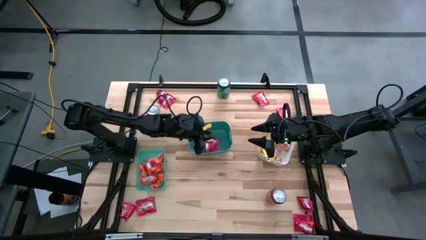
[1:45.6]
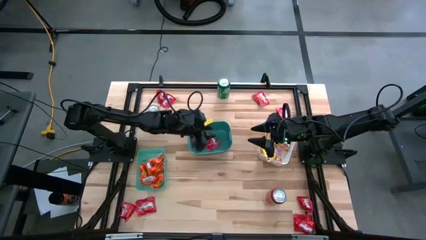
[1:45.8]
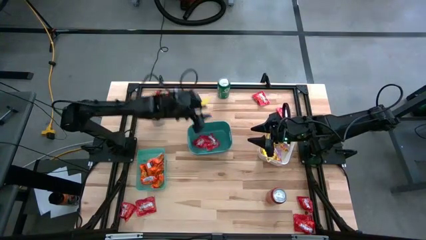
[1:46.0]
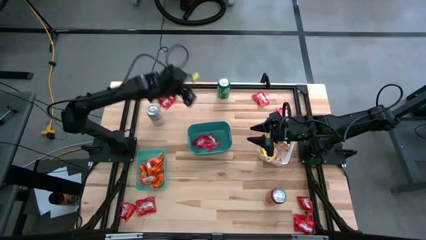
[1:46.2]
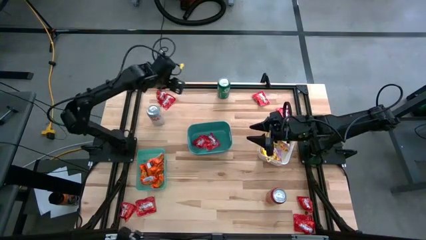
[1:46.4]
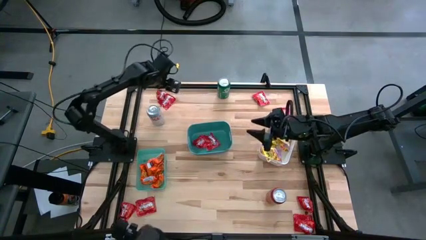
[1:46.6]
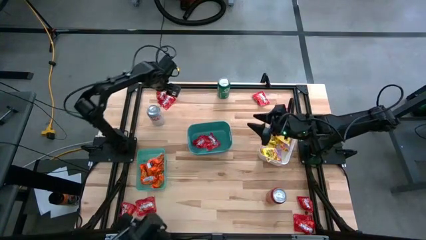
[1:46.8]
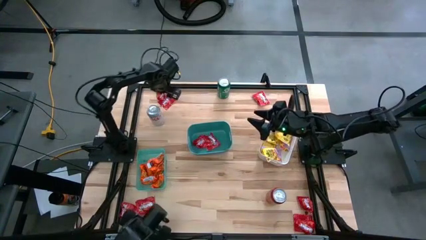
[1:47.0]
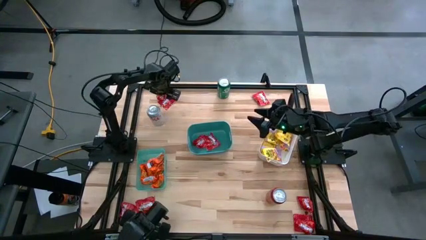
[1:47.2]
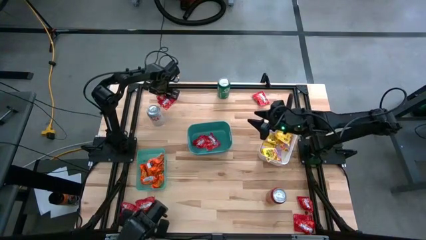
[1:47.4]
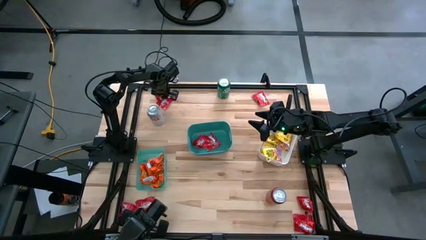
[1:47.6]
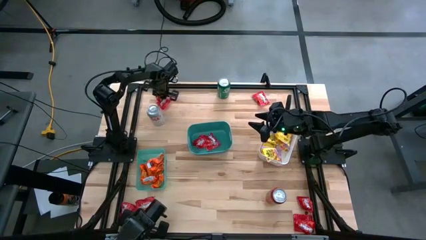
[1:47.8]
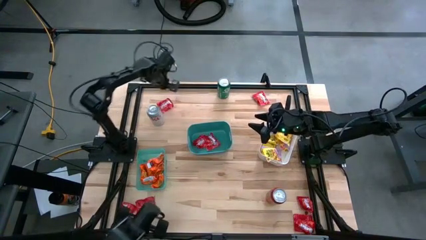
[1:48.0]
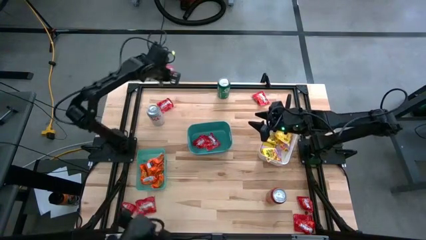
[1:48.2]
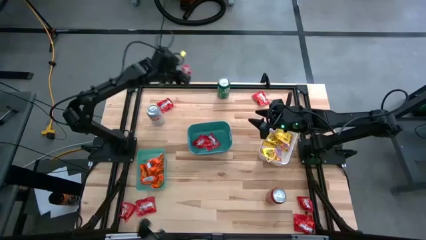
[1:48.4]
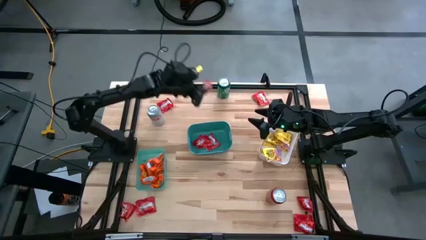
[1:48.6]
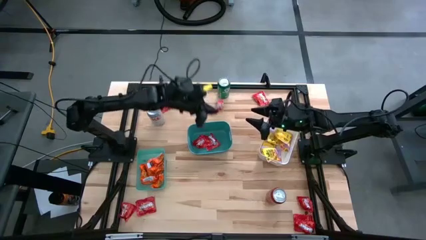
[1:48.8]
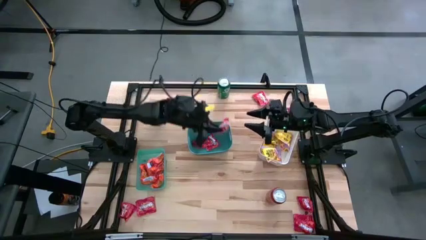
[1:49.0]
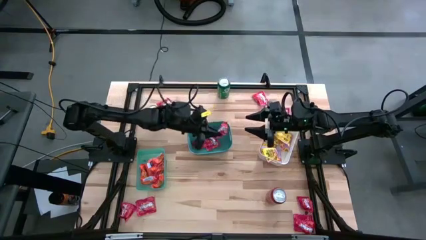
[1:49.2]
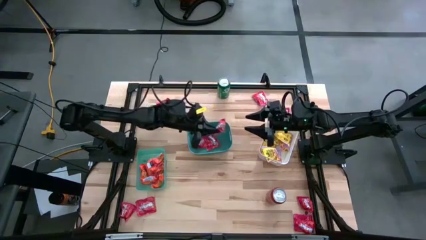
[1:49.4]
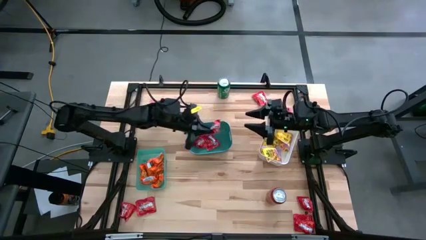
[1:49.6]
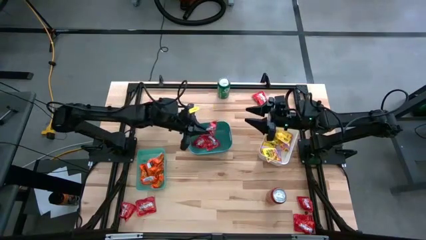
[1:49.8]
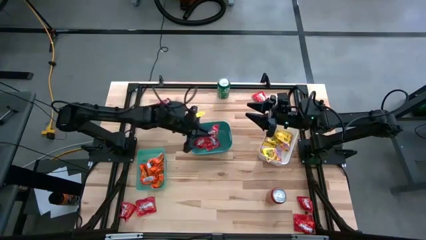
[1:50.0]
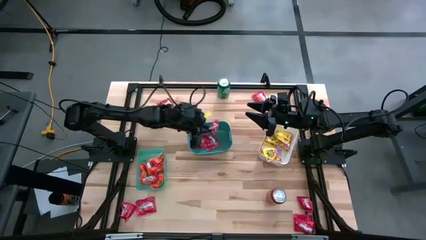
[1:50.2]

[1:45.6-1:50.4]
Task: Sort candy
Put the red candy into the green bin

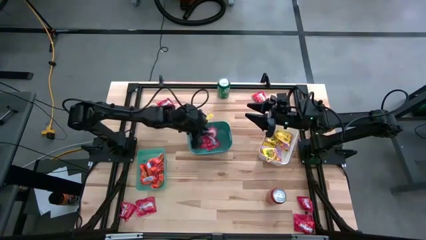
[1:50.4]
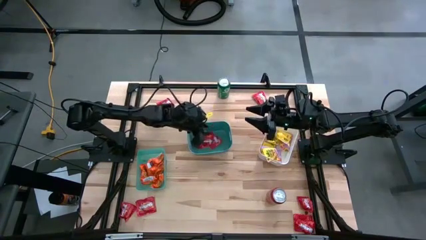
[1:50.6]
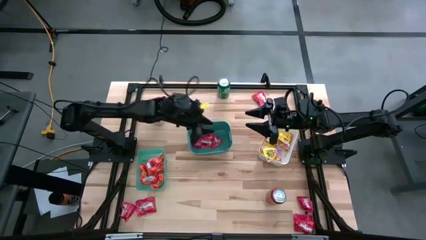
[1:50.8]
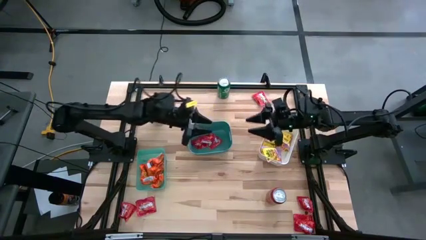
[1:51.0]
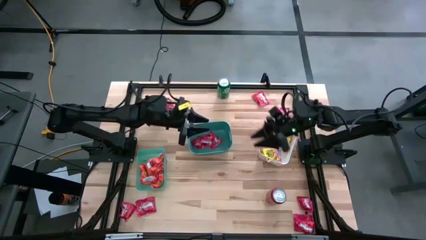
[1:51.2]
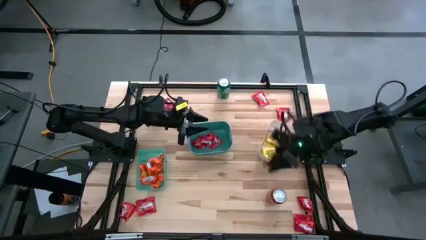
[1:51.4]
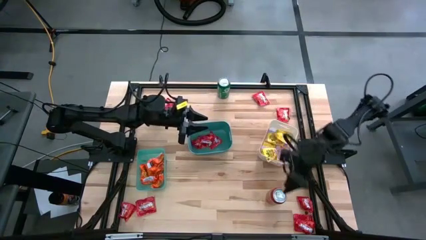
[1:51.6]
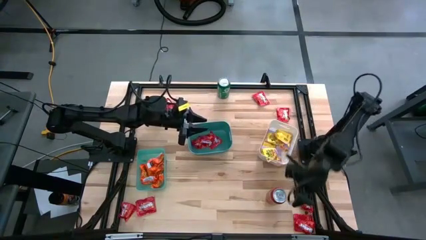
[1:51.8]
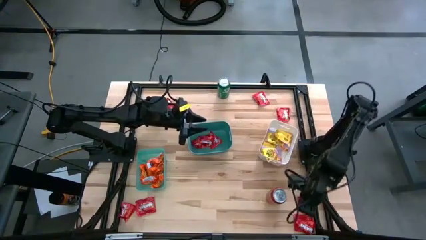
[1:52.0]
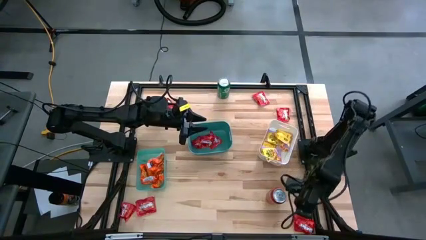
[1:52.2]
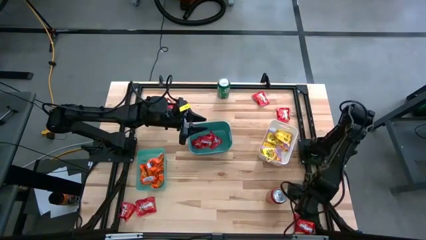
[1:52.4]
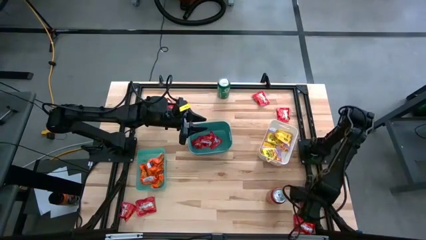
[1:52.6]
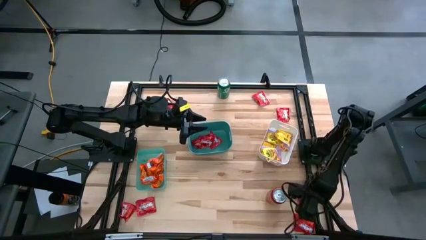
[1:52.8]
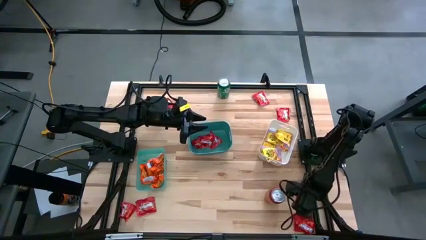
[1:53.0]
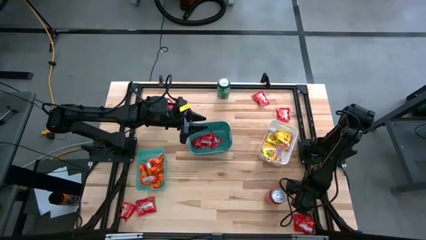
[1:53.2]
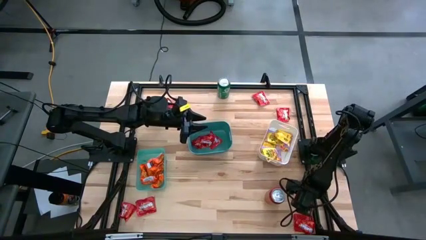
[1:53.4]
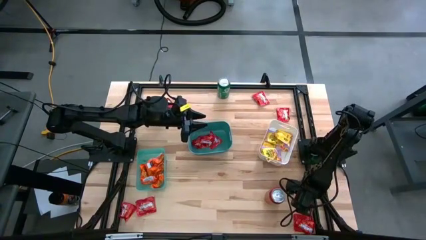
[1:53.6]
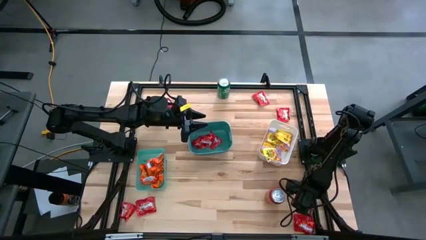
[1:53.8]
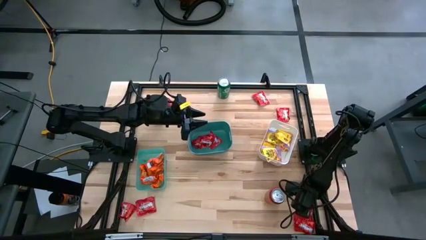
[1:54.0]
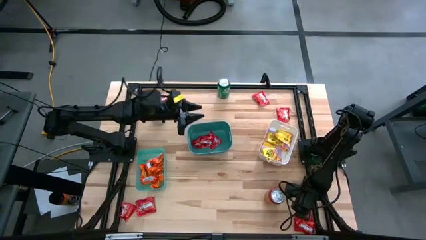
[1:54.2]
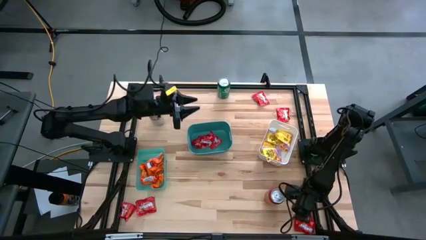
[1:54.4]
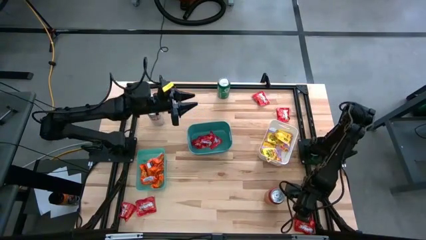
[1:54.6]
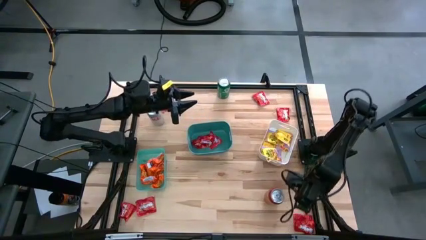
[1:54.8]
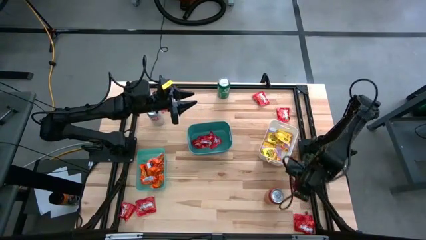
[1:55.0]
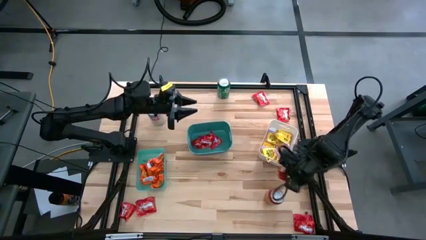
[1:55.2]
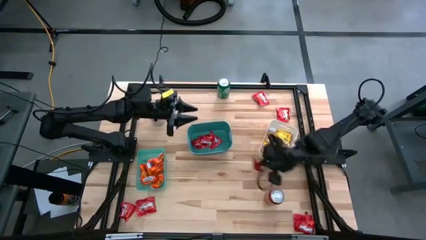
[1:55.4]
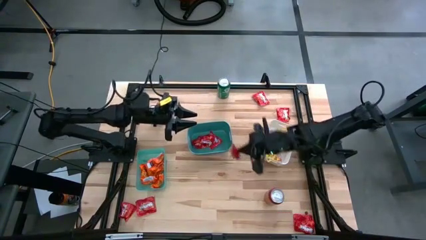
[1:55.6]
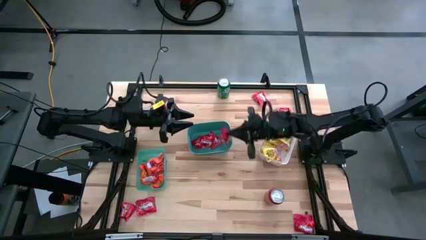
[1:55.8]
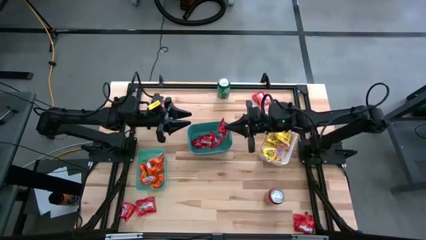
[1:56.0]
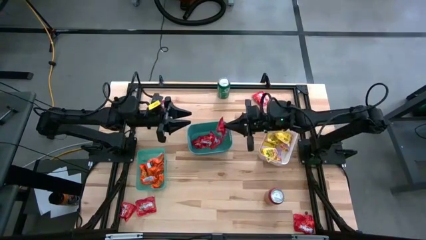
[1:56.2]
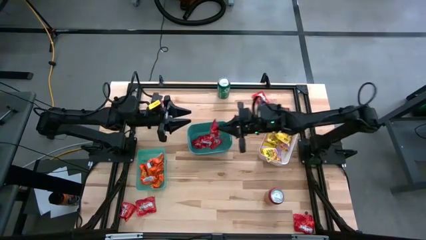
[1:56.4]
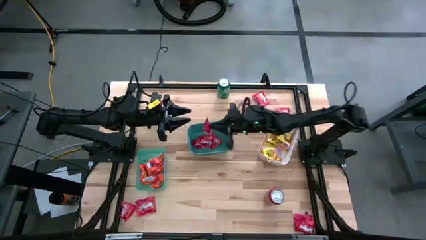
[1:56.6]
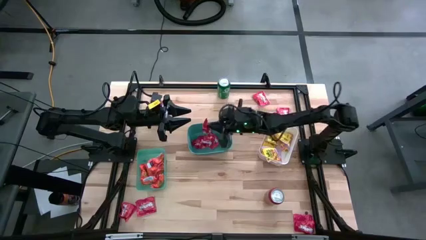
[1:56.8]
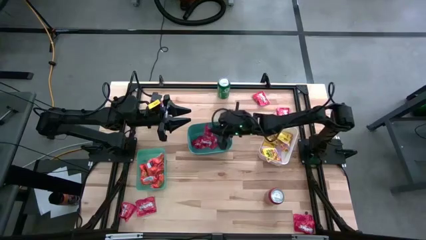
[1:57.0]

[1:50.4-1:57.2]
Put the red candy into the green bin

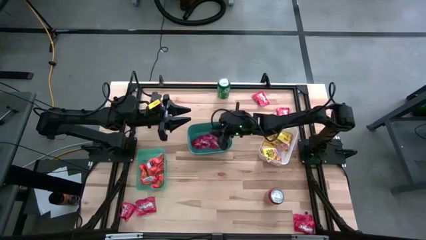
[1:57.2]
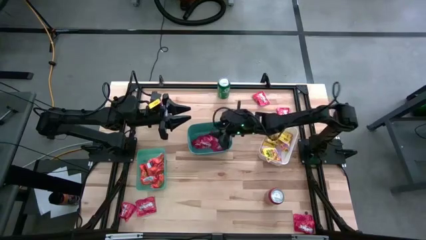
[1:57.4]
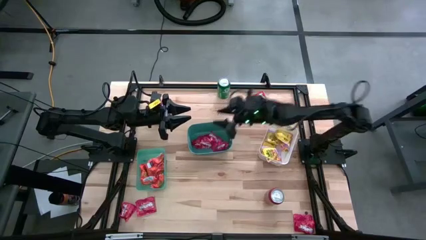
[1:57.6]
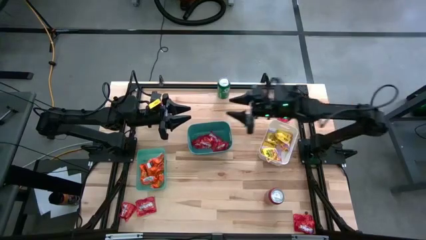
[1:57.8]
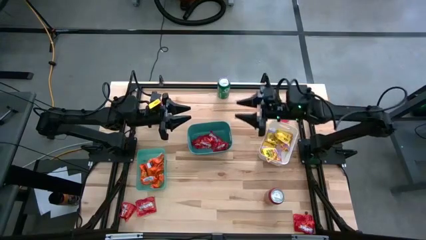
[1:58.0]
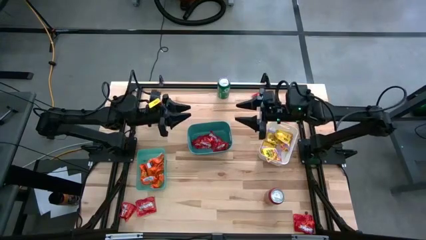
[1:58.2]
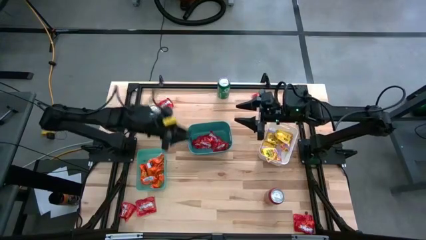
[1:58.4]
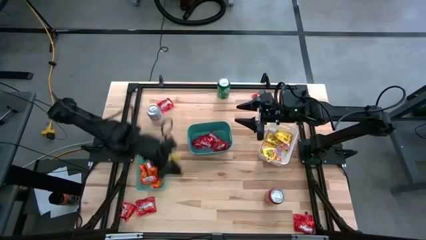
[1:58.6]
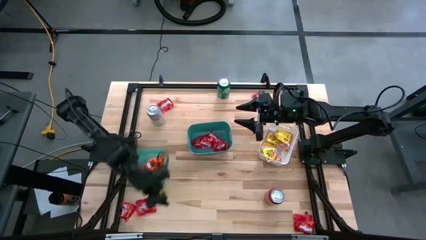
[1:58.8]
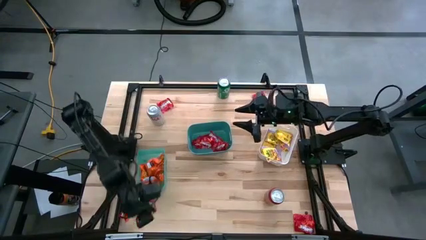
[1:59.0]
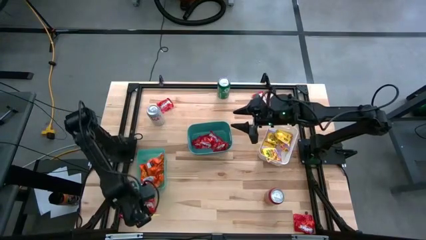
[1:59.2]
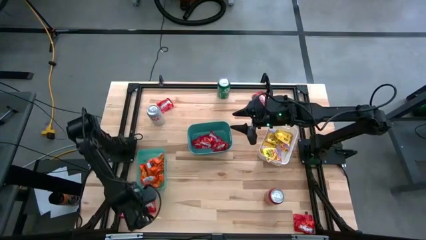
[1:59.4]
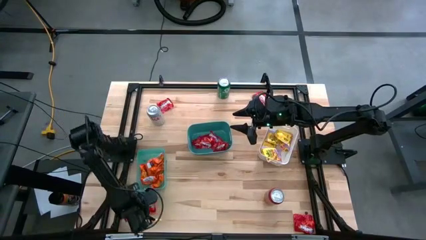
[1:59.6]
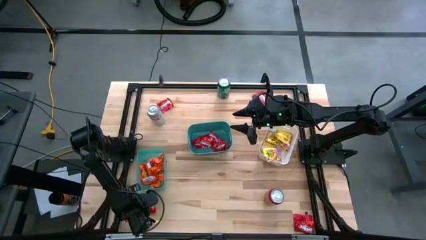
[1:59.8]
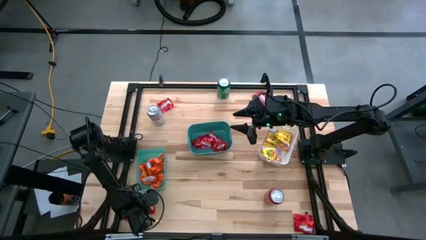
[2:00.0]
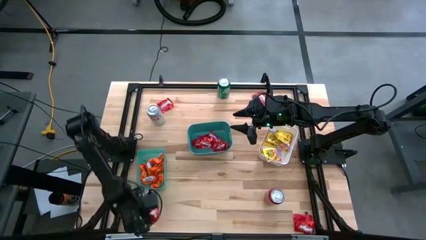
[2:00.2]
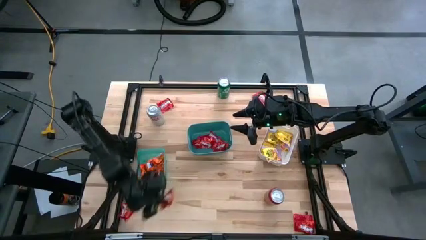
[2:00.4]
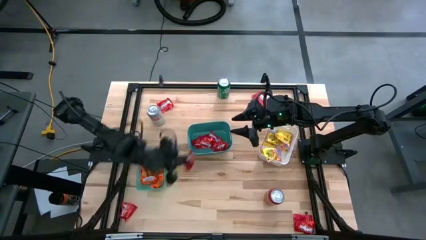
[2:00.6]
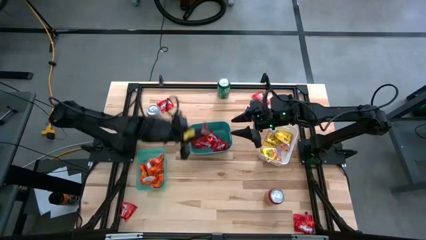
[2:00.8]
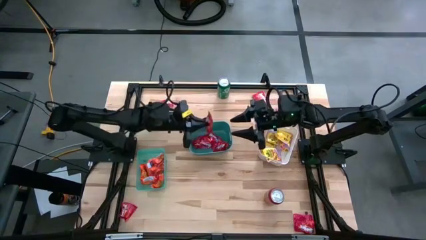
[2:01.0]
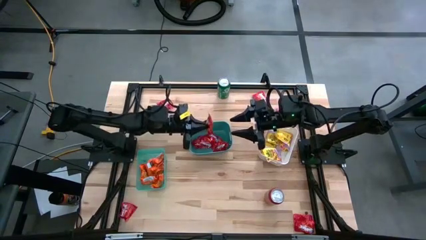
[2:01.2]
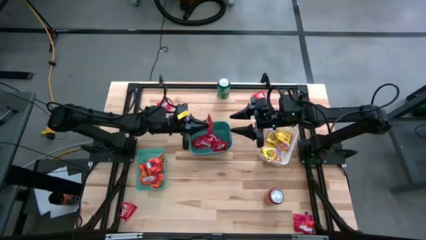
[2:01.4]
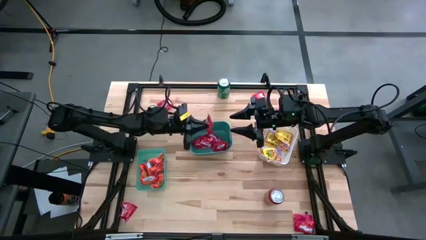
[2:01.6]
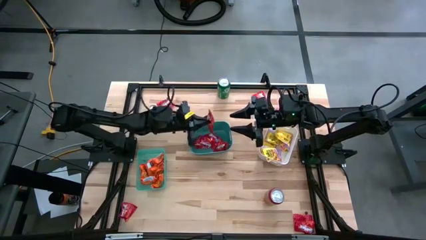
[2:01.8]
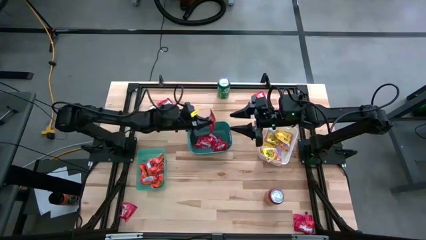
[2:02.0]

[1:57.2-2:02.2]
Put the red candy into the green bin
